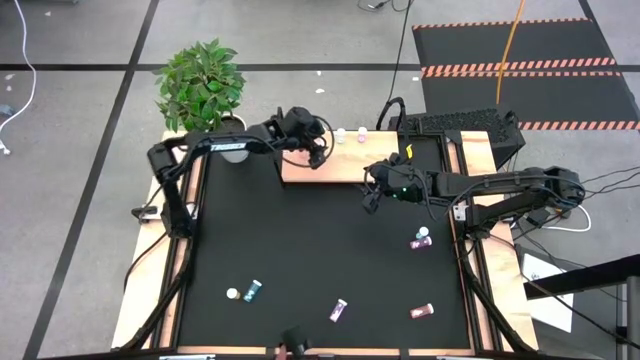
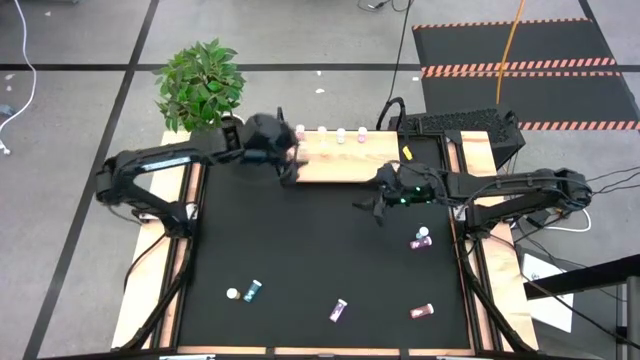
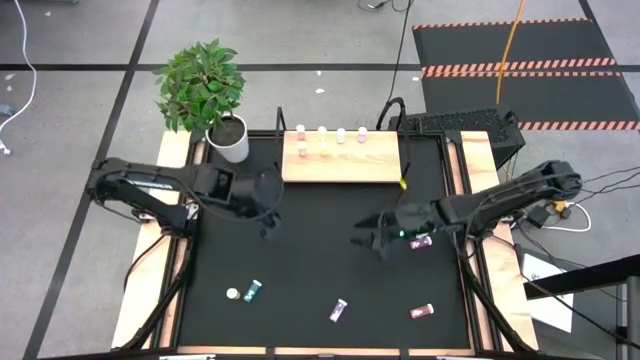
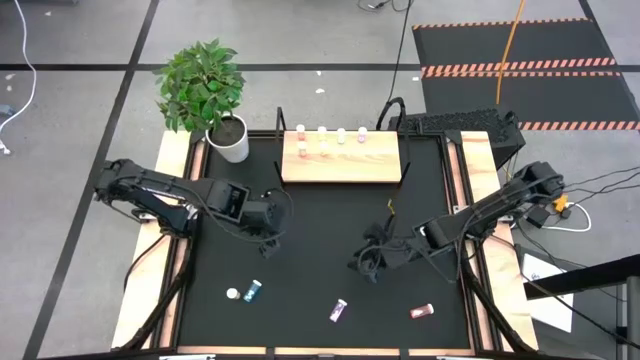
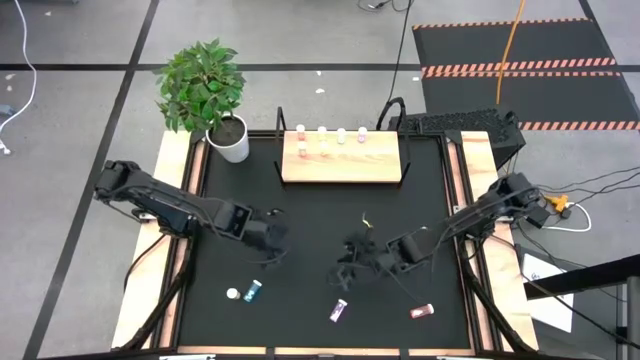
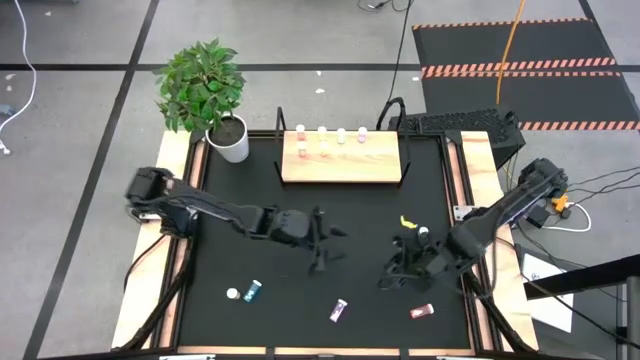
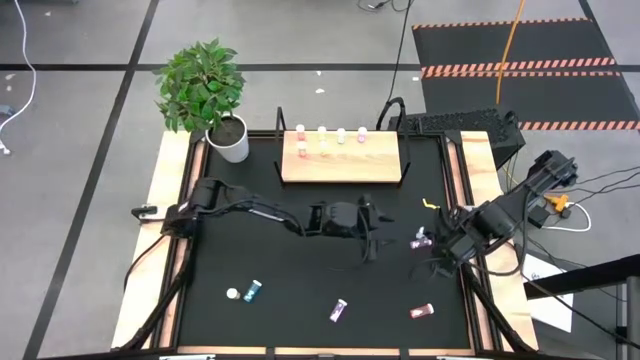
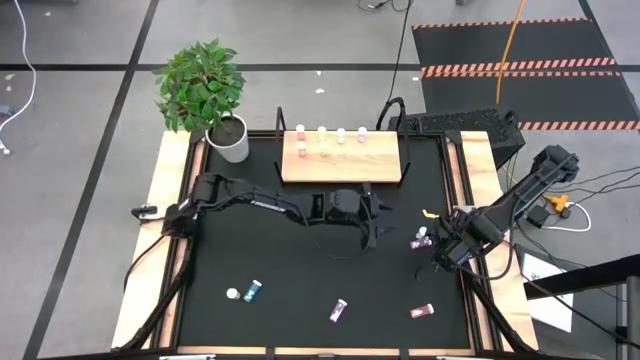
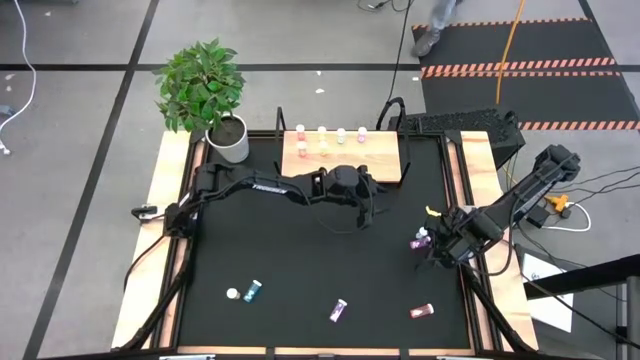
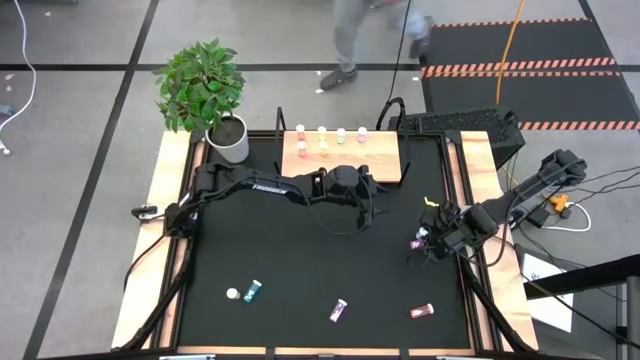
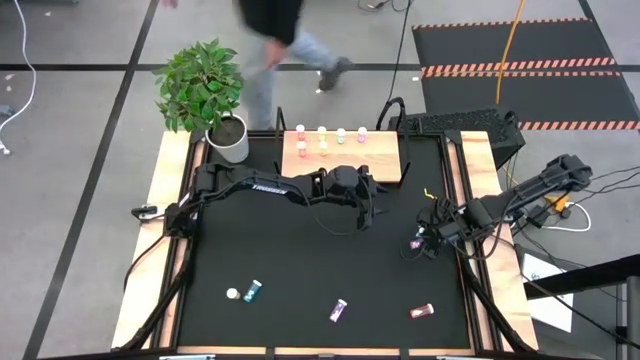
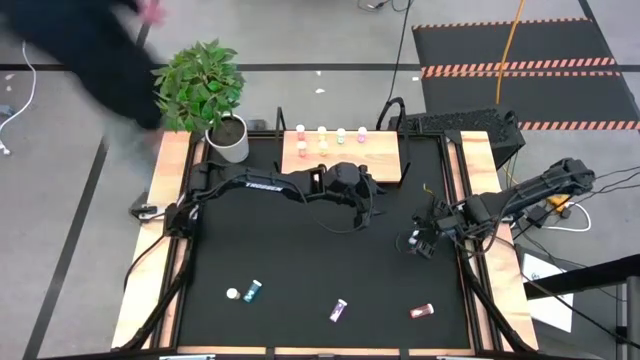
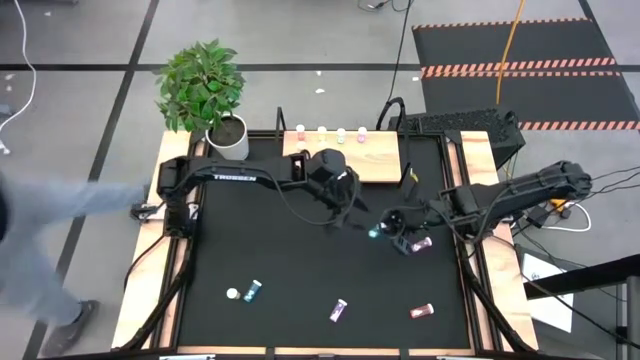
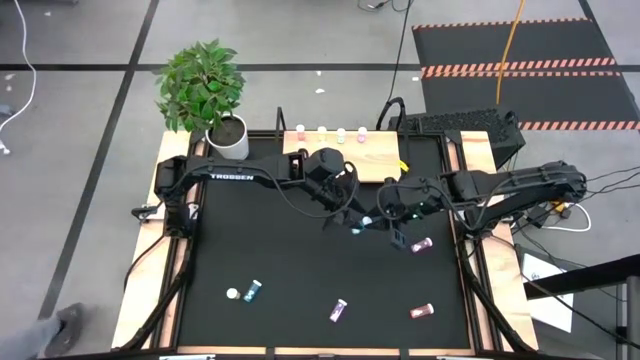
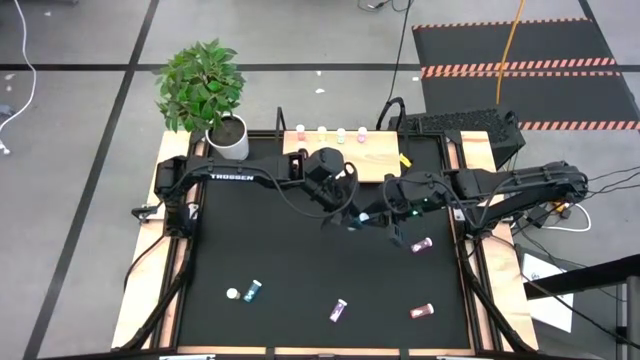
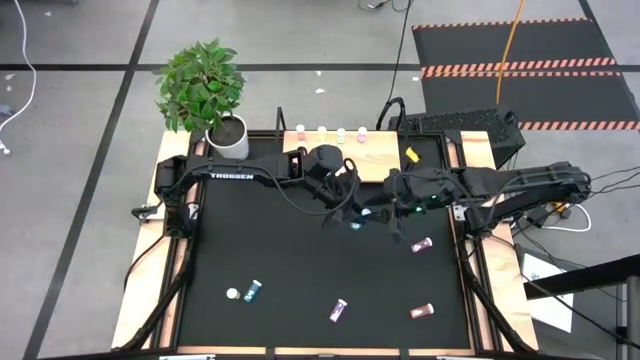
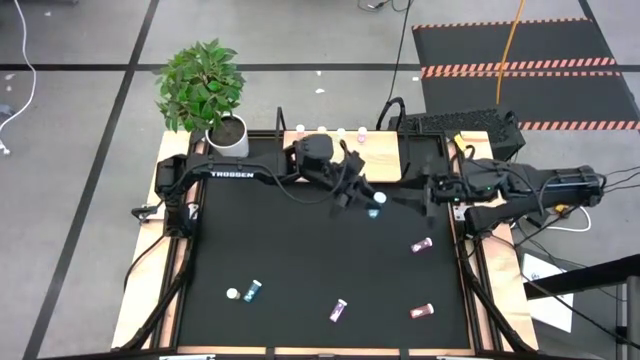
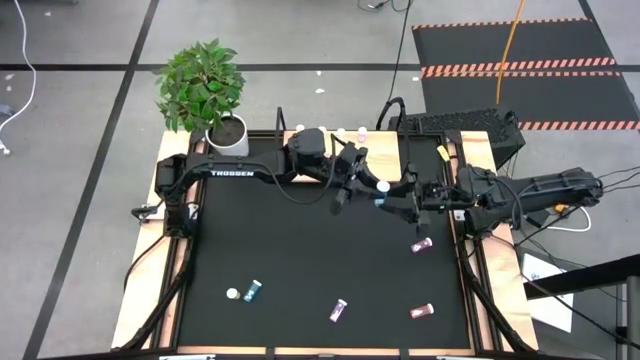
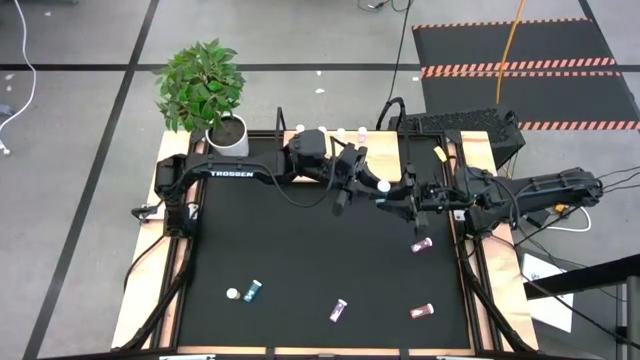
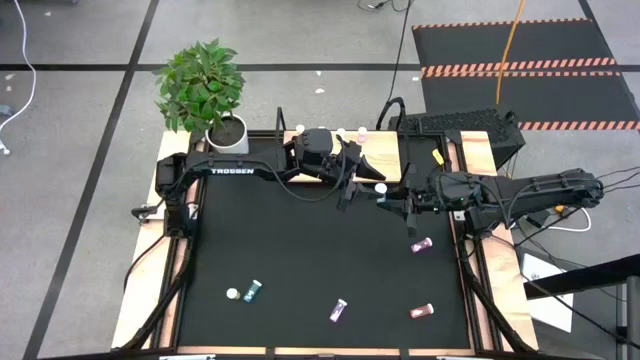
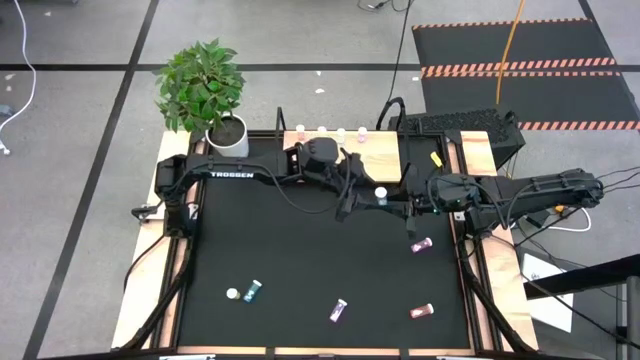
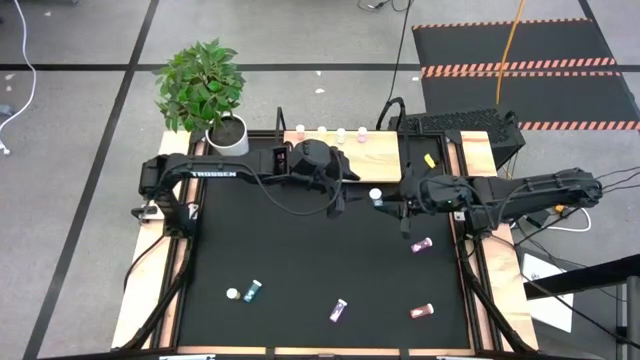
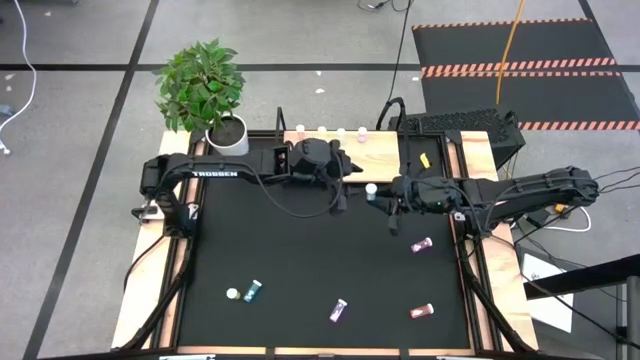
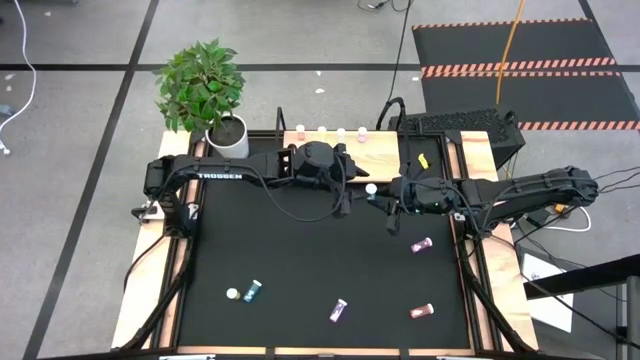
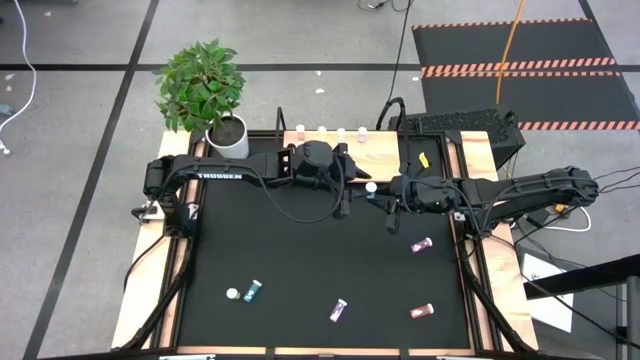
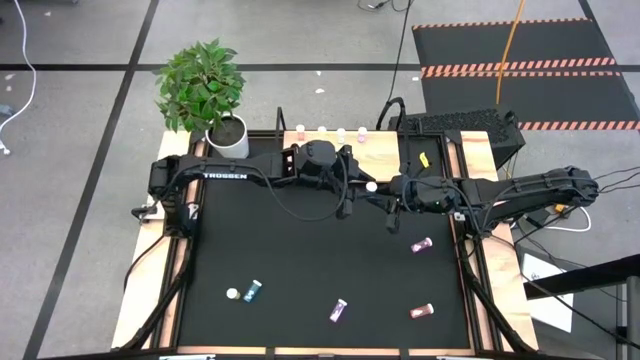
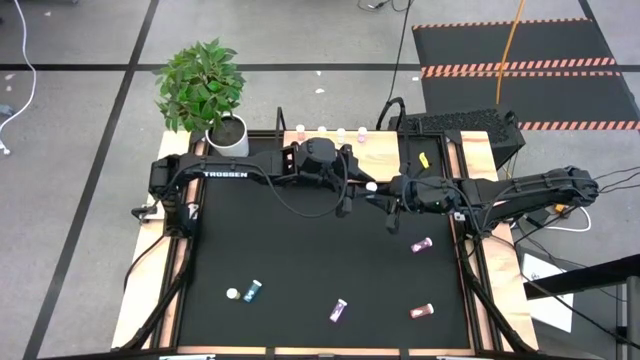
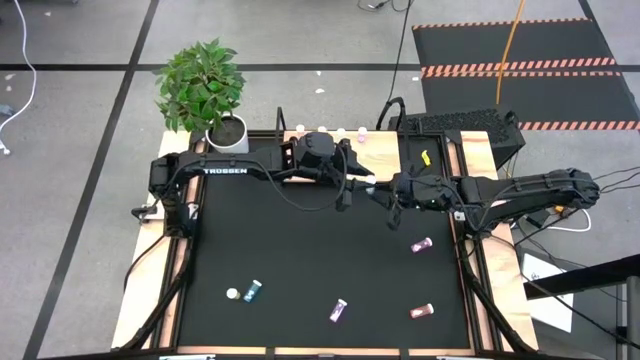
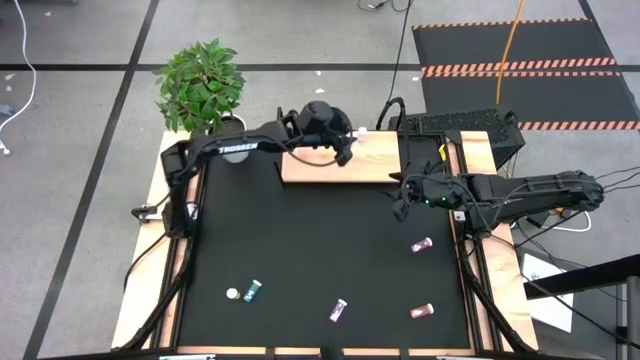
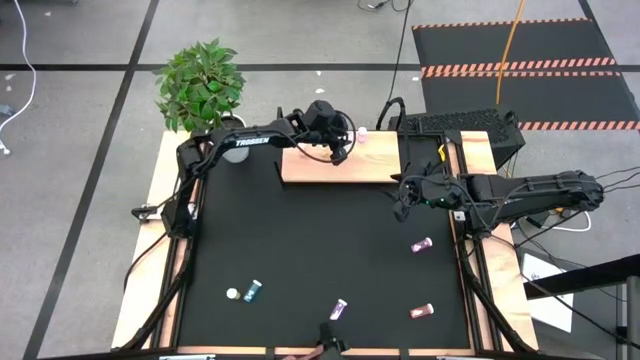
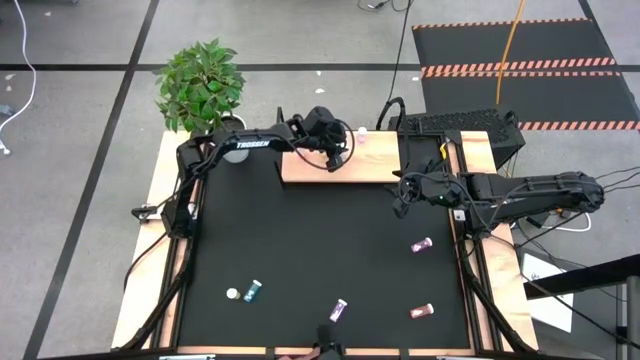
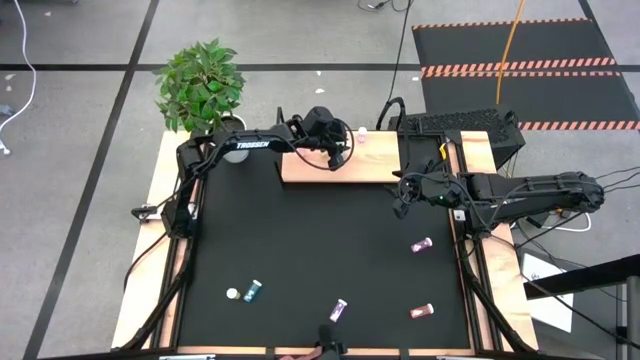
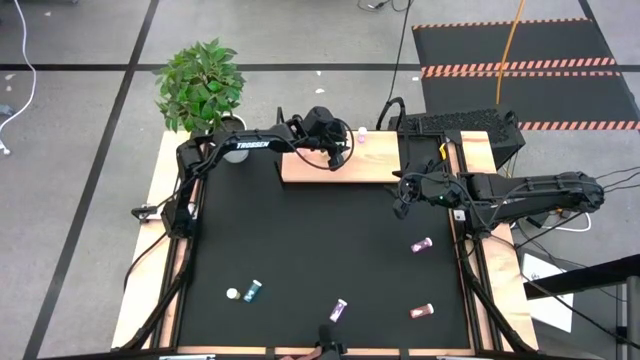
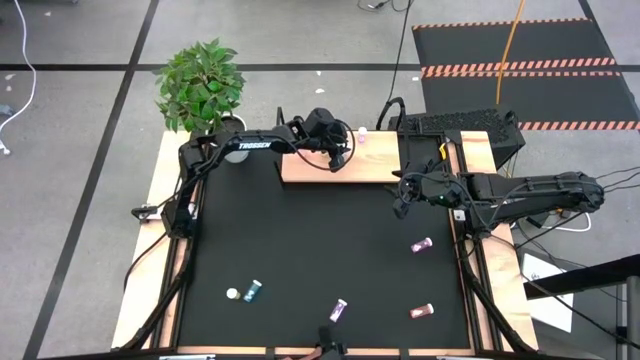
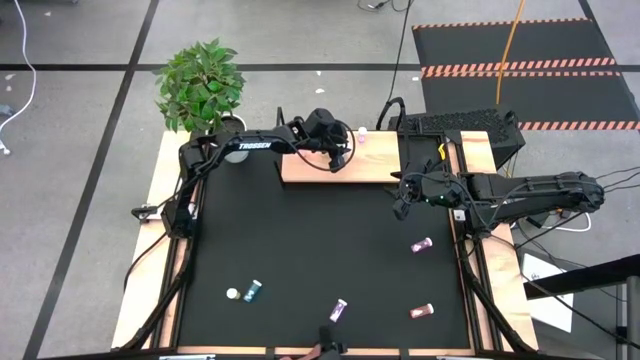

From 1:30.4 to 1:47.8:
Task: Pick and place medicine bottles onto shelf by color
Put the right blue pill bottle on the shelf aligned with the other blue pill bottle

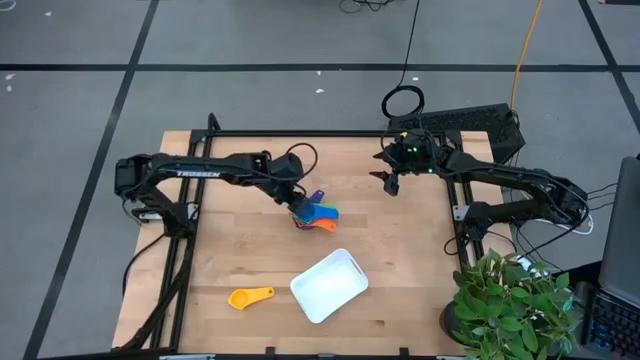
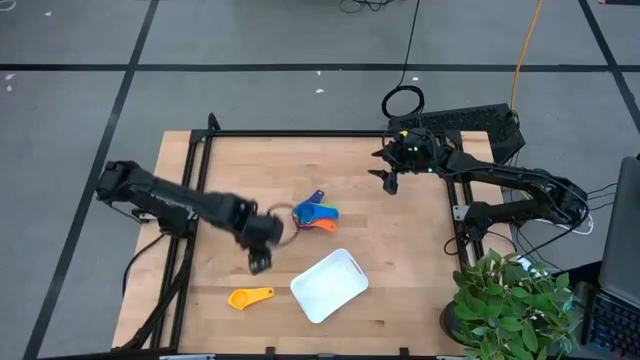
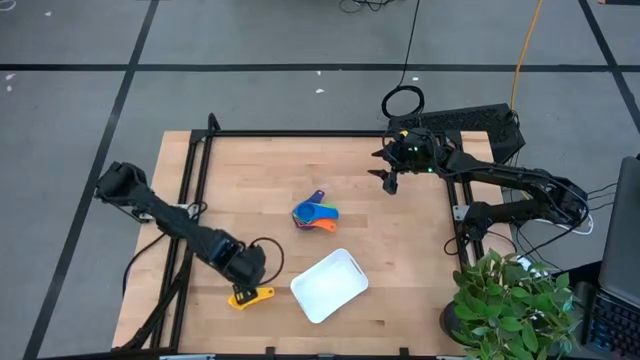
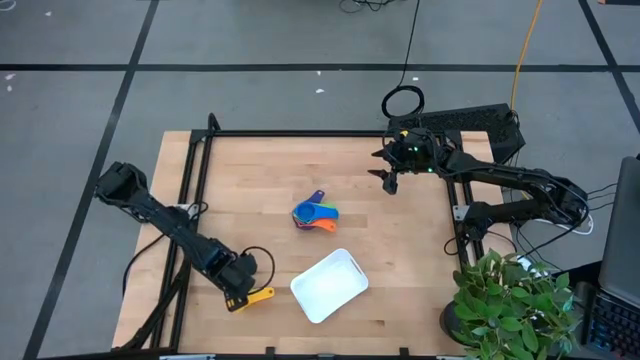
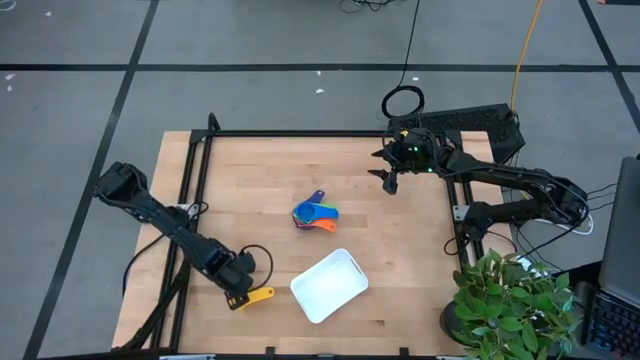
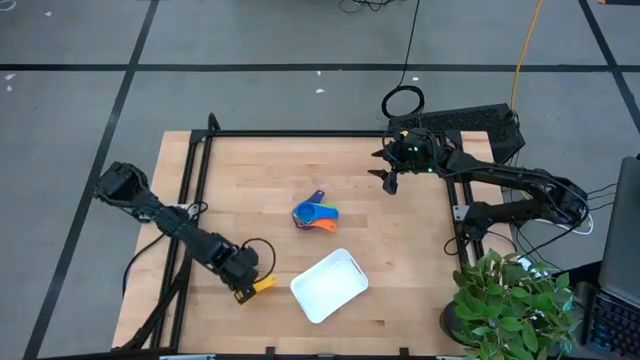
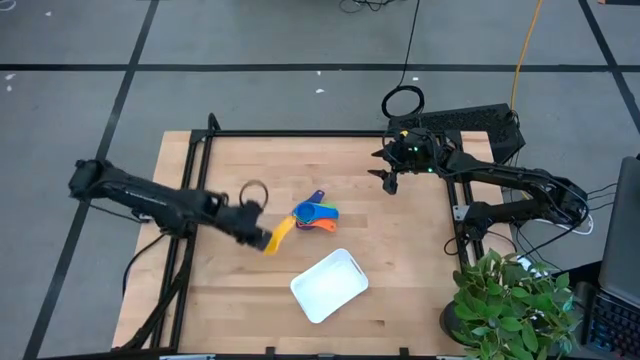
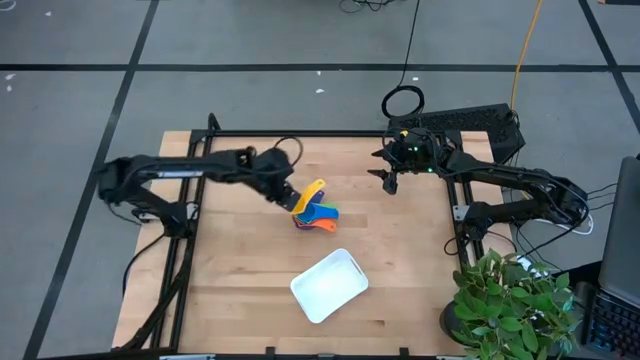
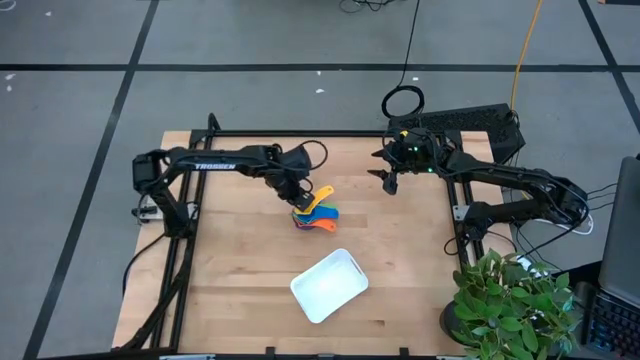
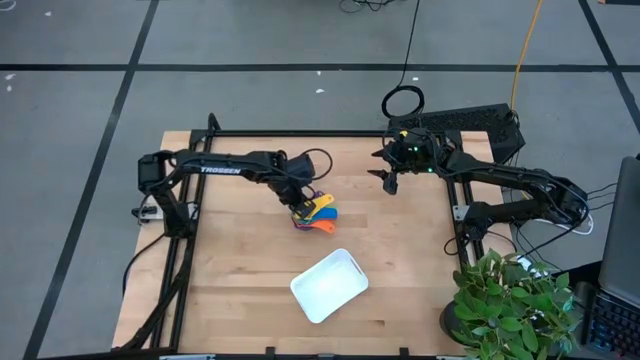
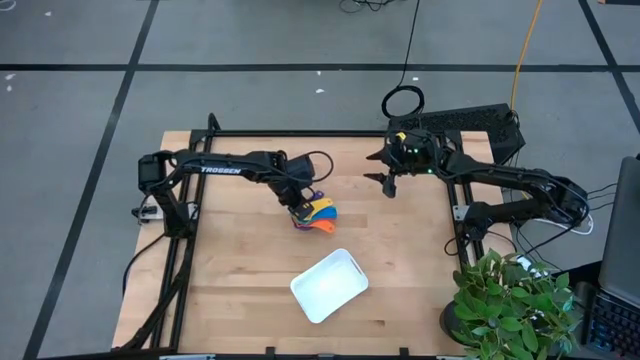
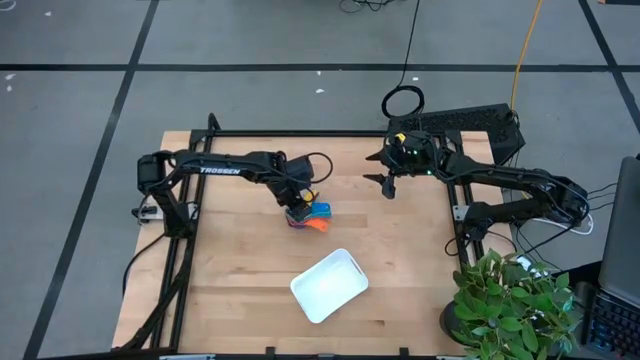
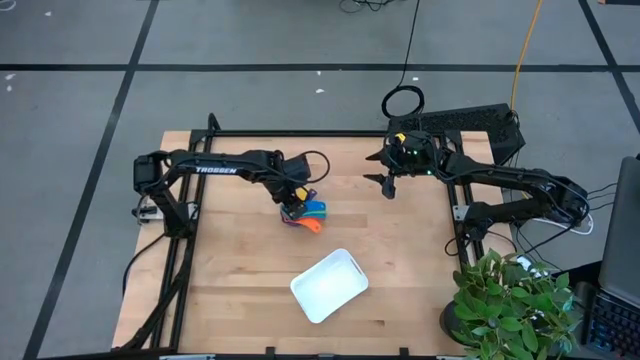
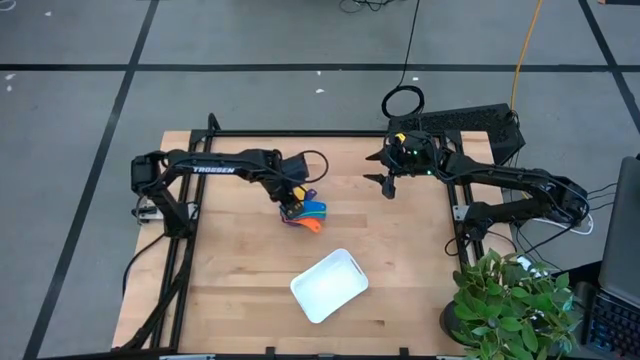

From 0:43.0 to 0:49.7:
Task: Nest measuring cups in basket
Stack the yellow measuring cup on top of the blue measuring cup
